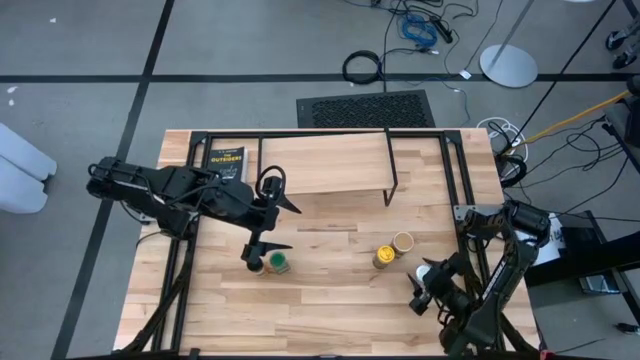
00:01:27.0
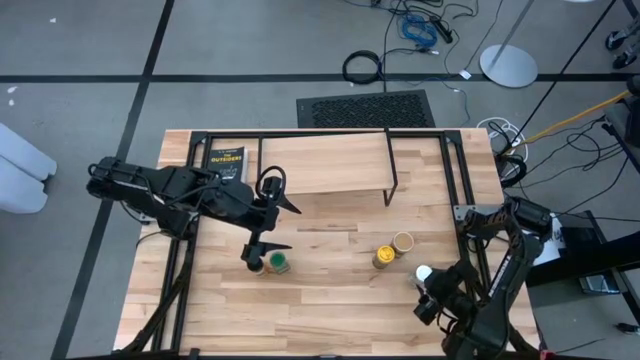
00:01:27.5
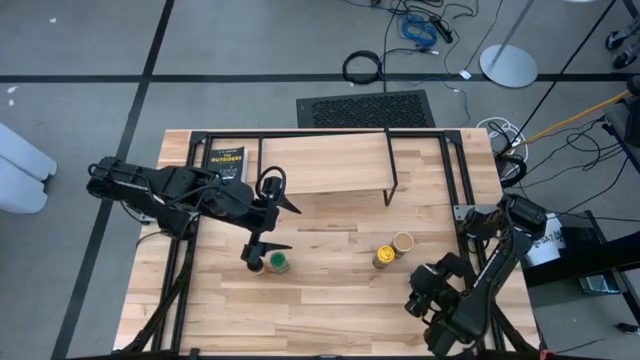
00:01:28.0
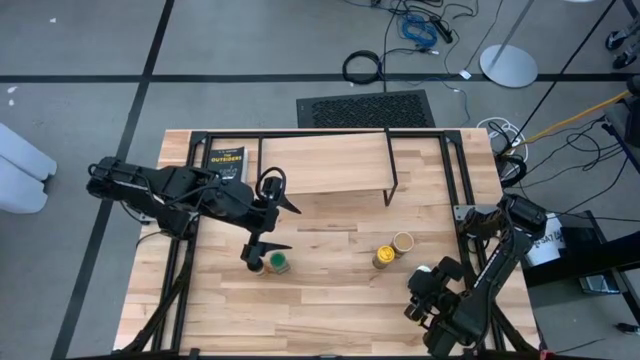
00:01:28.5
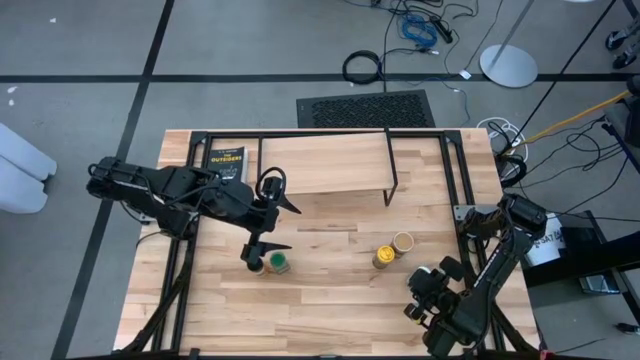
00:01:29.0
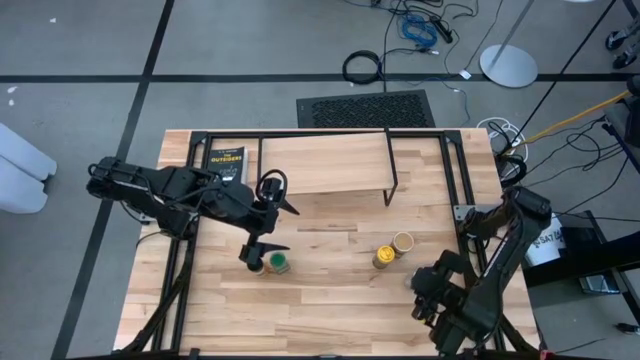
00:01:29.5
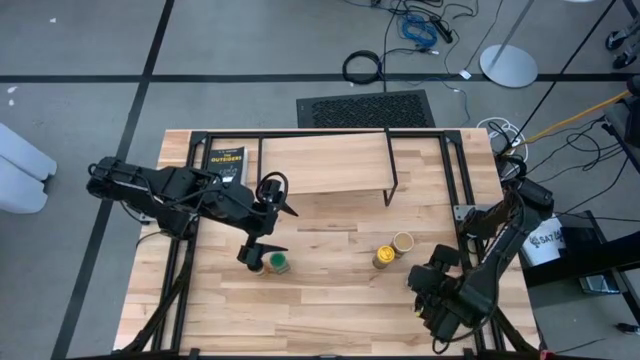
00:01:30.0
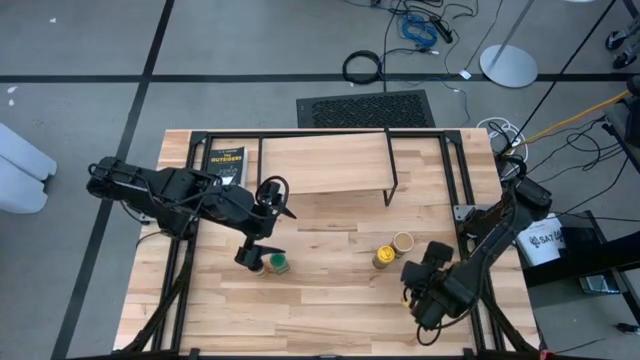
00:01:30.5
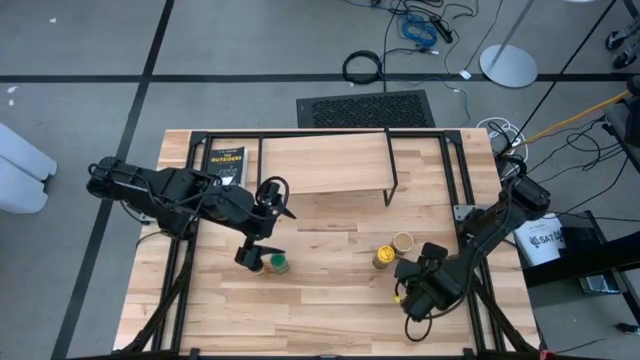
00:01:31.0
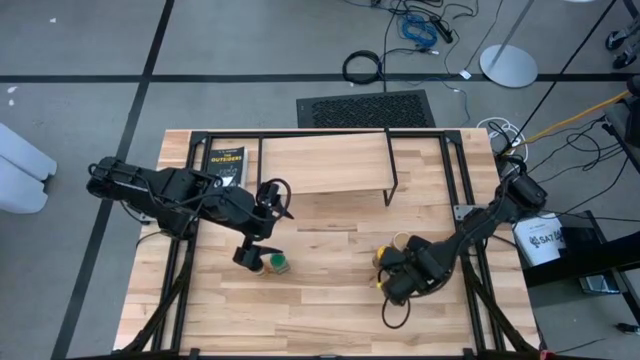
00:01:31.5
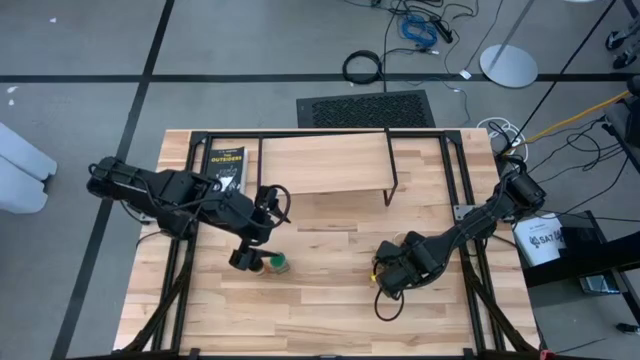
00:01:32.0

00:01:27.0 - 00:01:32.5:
Task: Shelf spices
Adjust the white seasoning bottle

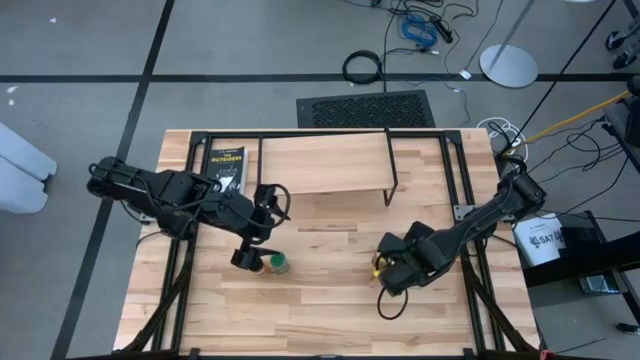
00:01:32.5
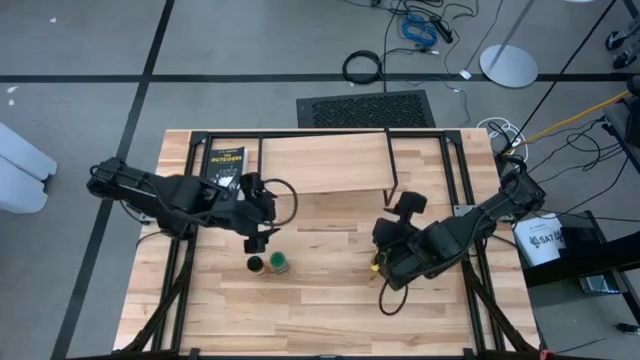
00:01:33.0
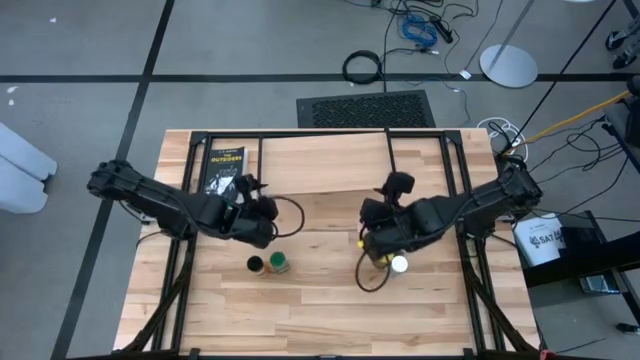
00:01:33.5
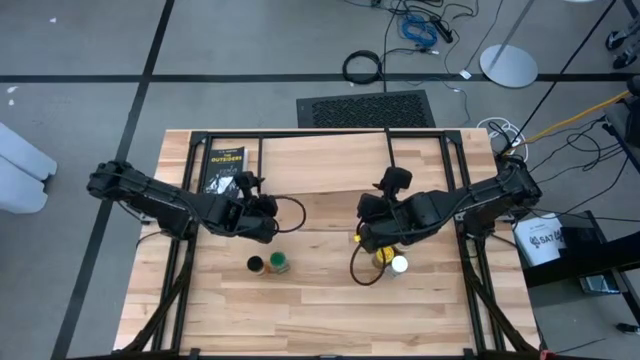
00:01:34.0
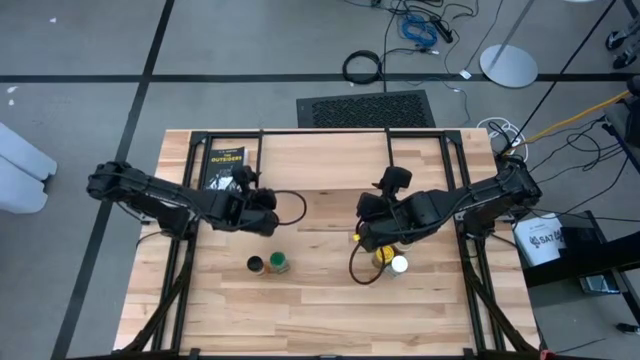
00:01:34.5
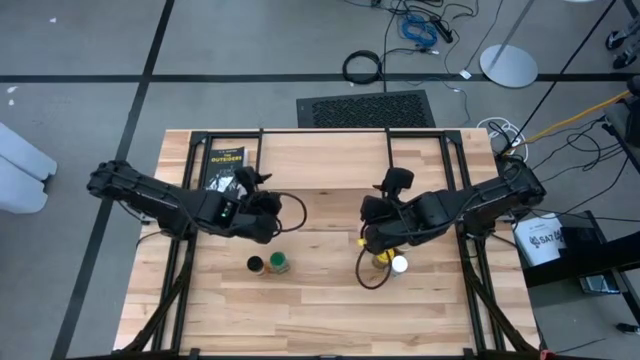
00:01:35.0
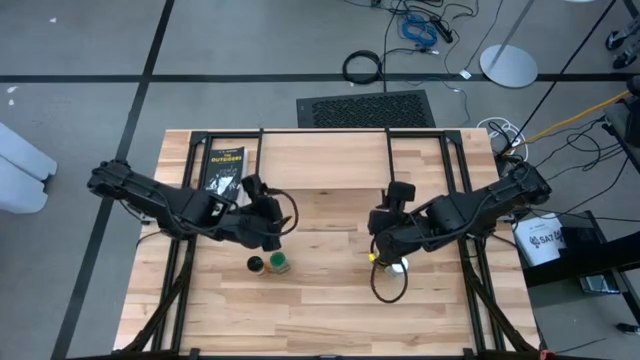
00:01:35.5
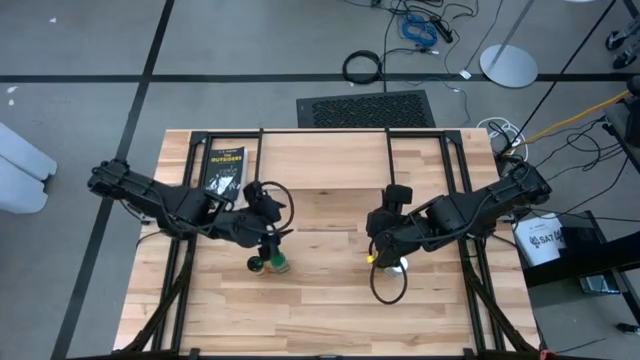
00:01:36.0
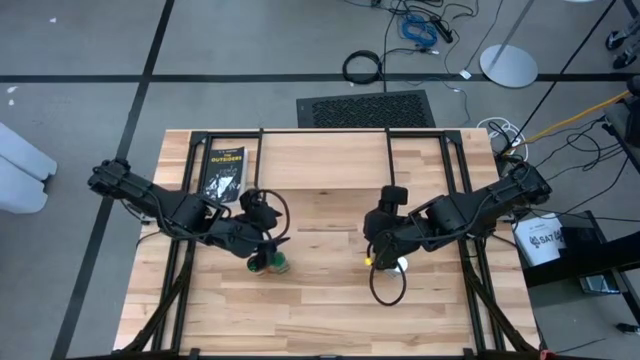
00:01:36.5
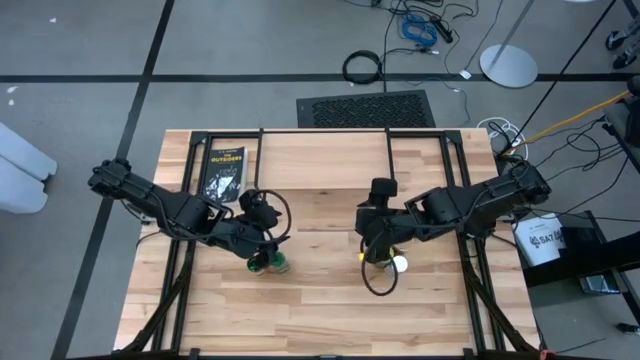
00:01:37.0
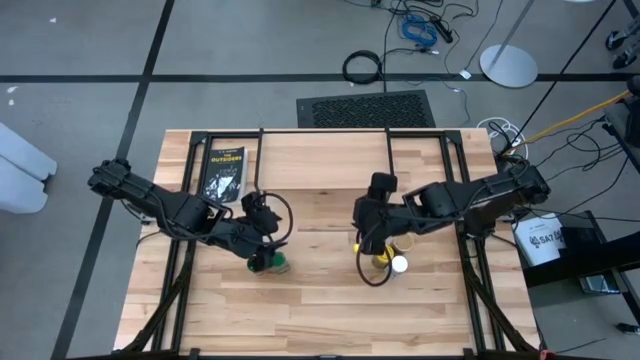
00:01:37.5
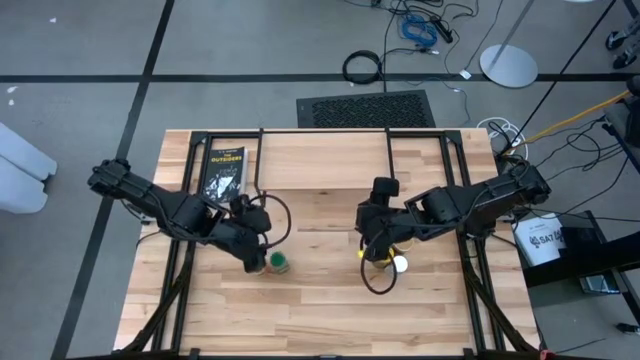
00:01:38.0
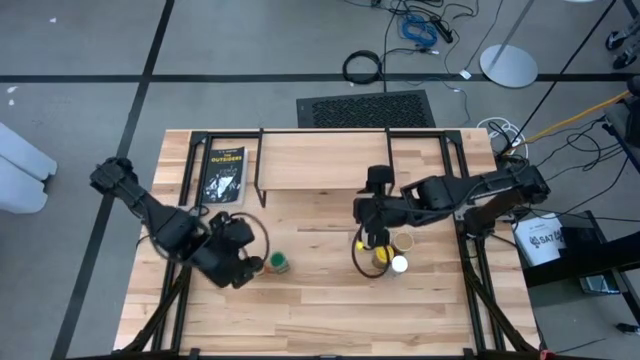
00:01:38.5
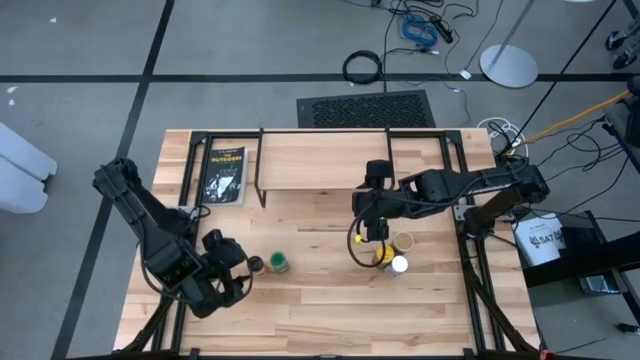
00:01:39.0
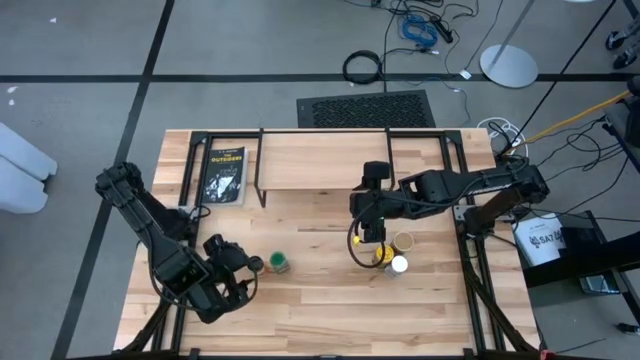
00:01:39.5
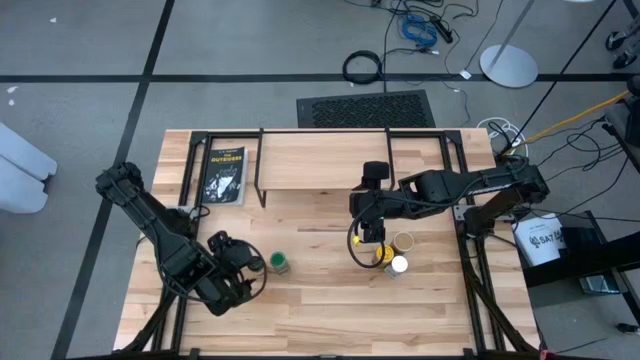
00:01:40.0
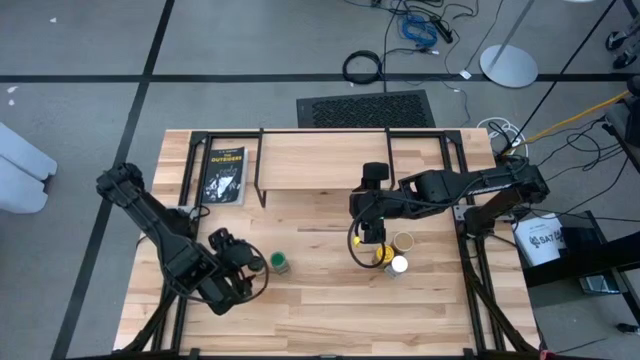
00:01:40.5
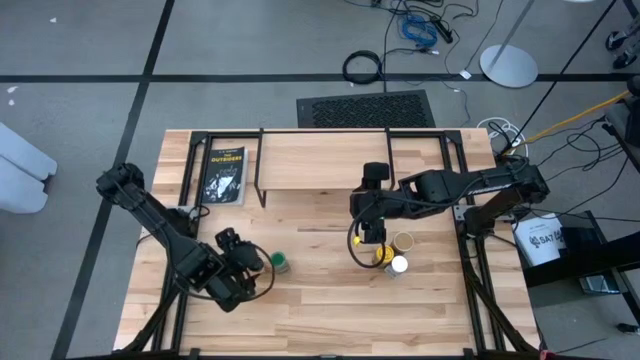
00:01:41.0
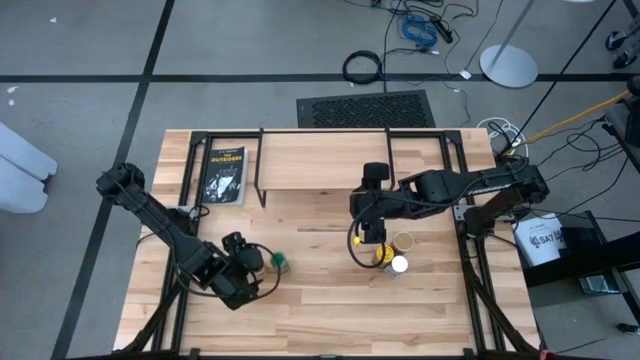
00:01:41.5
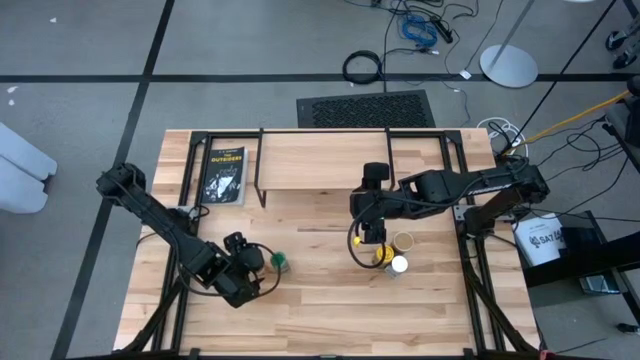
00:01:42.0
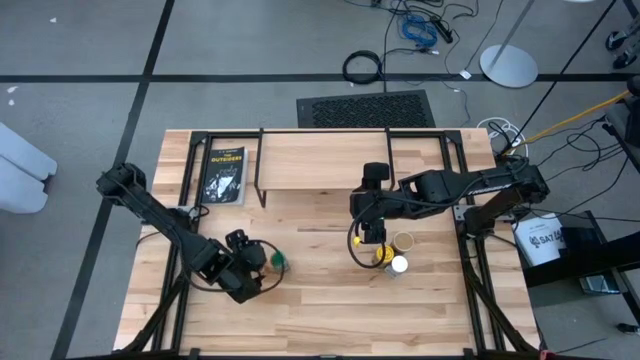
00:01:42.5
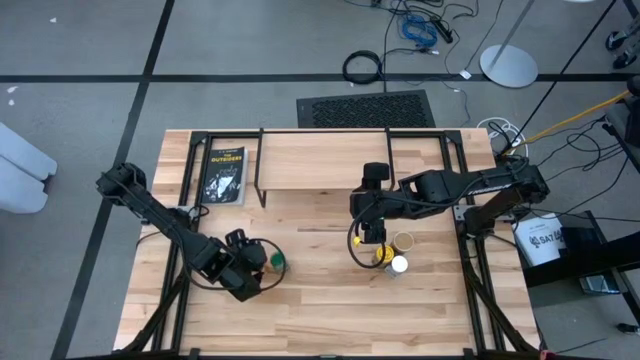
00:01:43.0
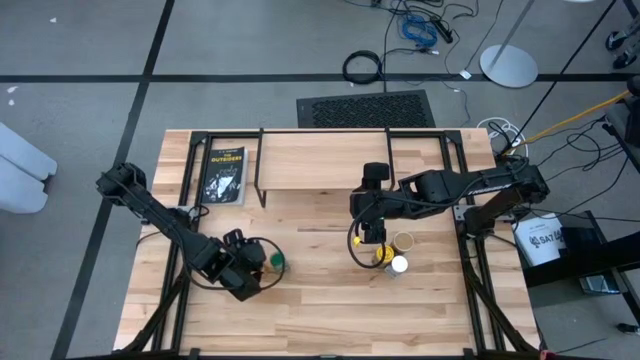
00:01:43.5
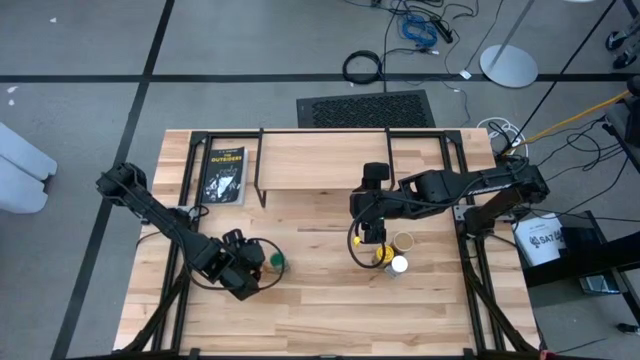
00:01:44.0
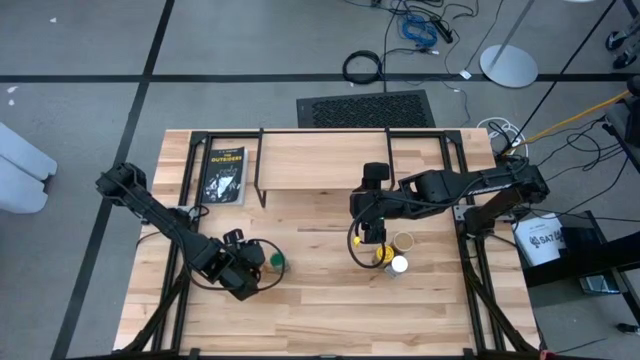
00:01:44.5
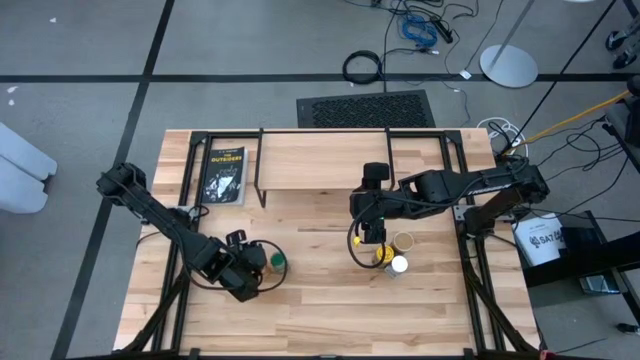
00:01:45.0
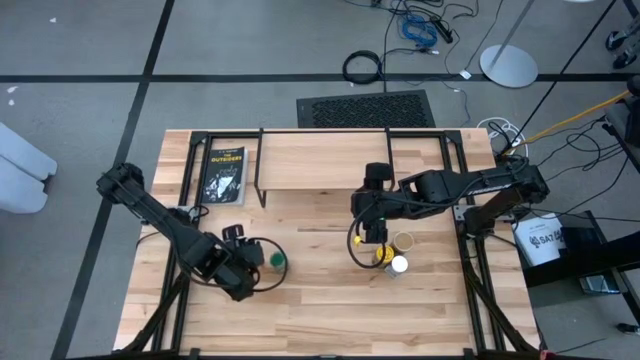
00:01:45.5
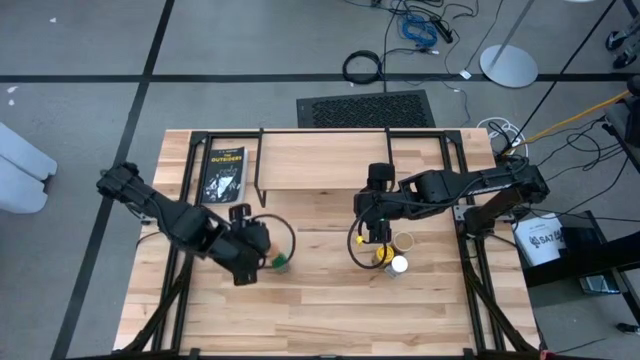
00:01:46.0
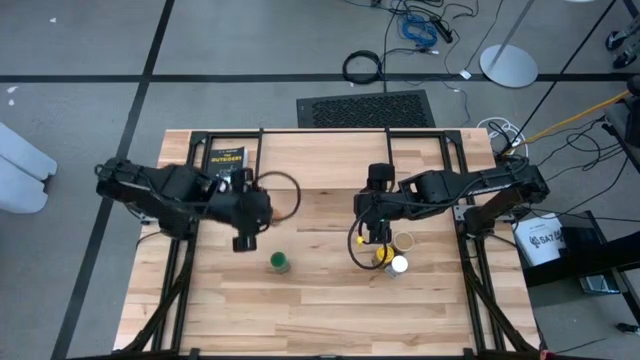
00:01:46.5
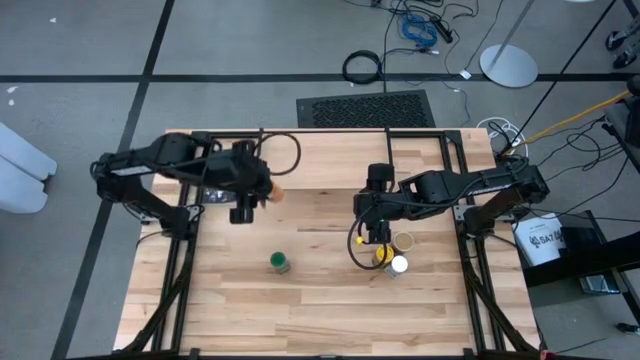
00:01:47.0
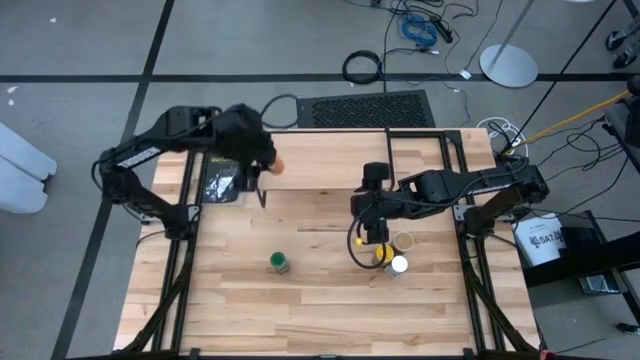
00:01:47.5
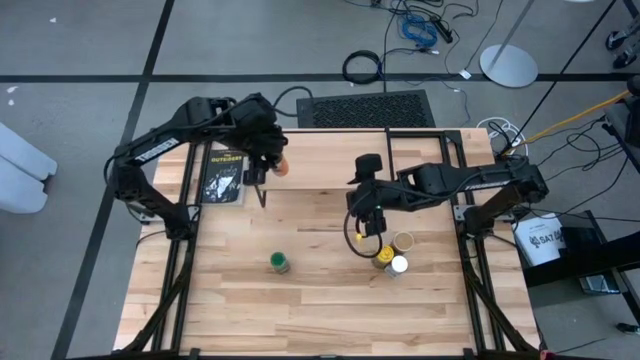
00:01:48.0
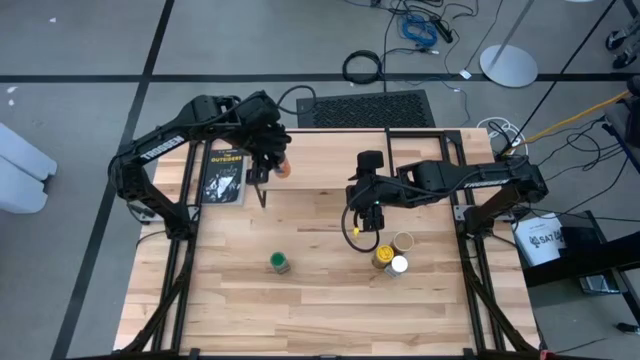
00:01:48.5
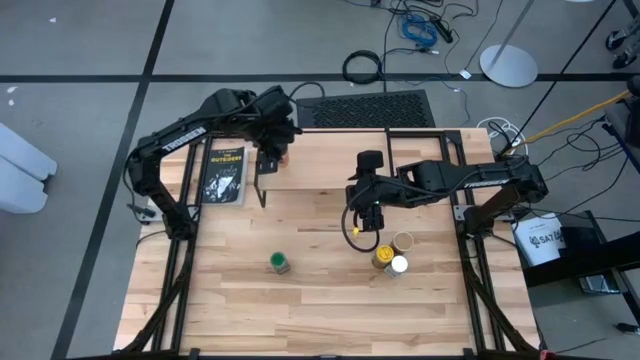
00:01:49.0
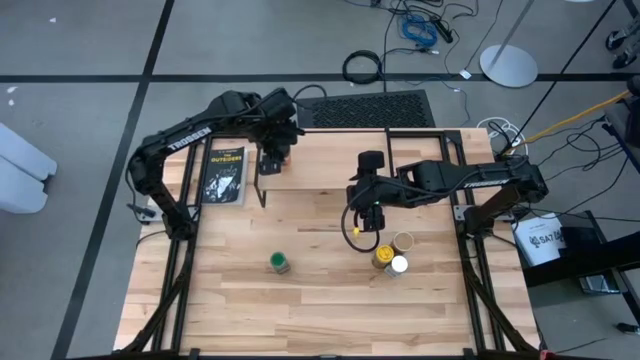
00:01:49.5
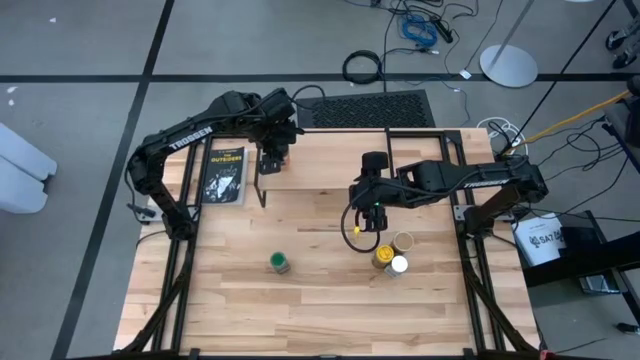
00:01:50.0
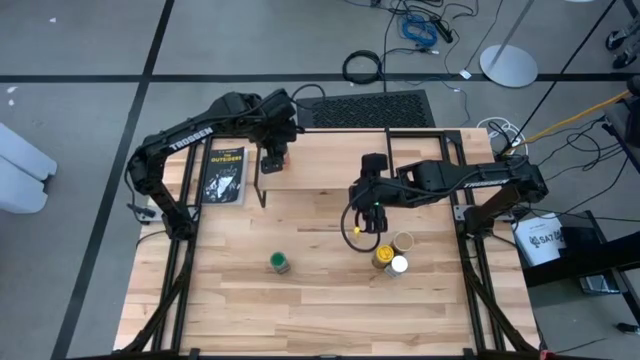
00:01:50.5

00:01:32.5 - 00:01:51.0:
Put the black seasoning bottle on the shelf
